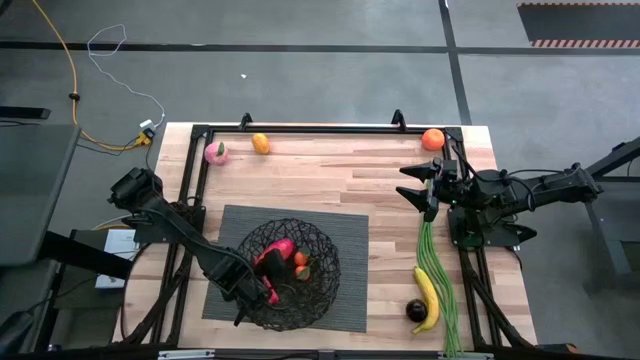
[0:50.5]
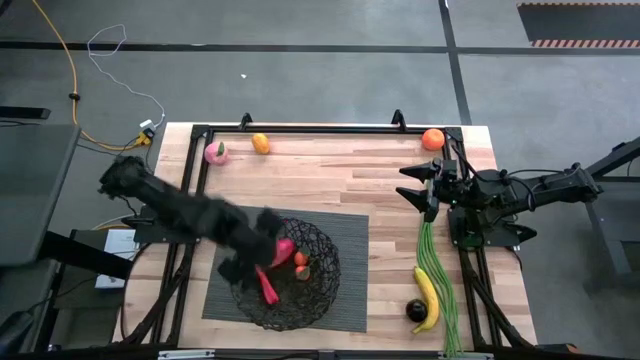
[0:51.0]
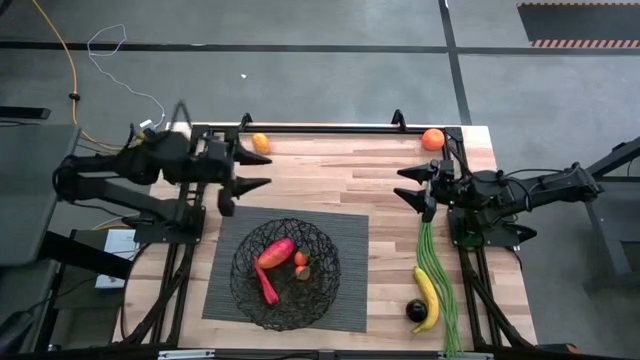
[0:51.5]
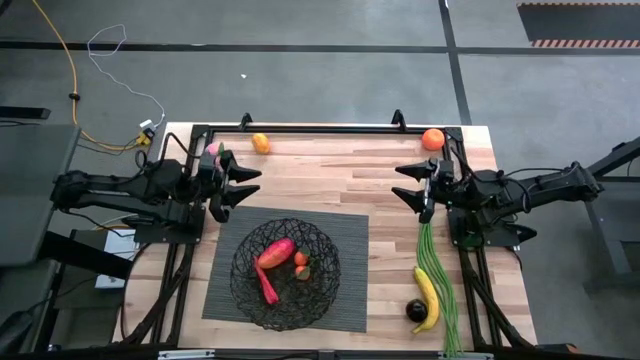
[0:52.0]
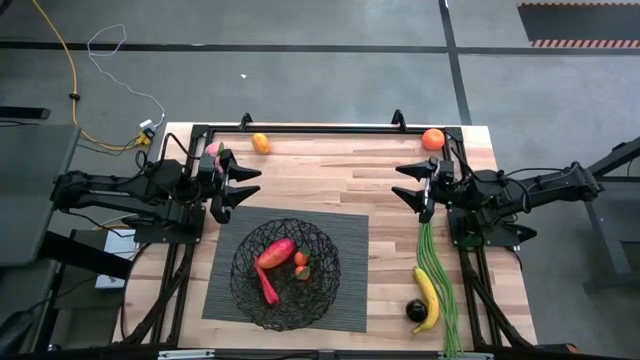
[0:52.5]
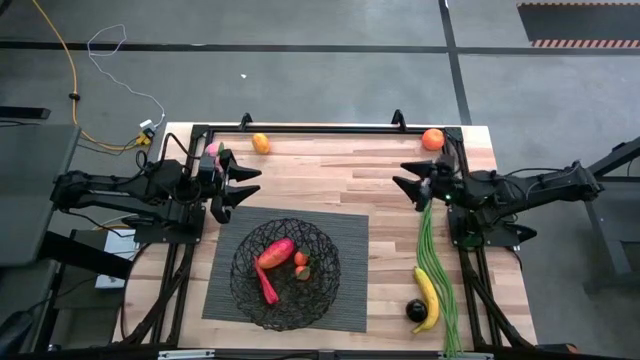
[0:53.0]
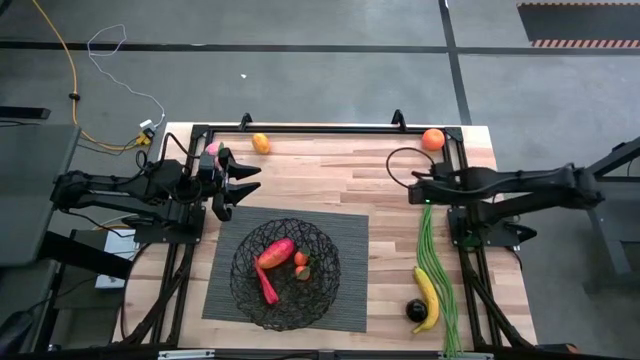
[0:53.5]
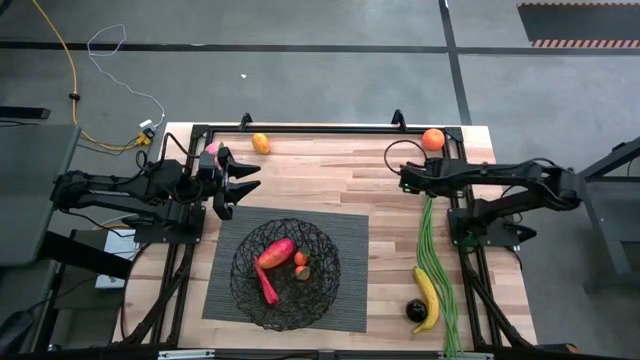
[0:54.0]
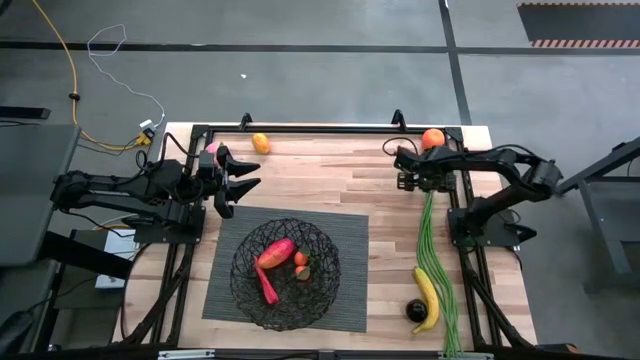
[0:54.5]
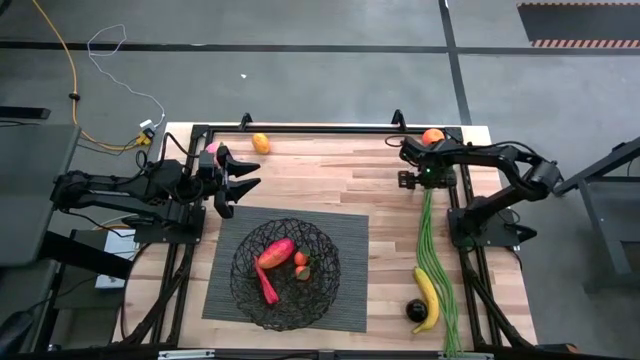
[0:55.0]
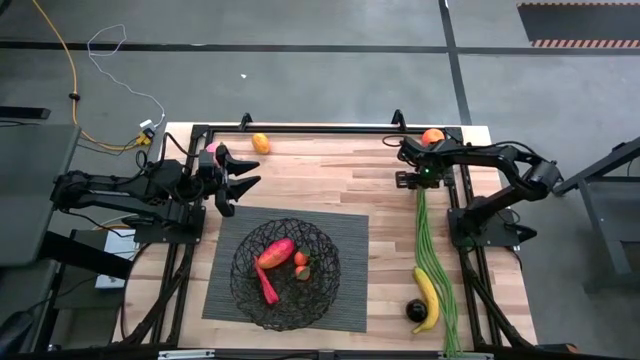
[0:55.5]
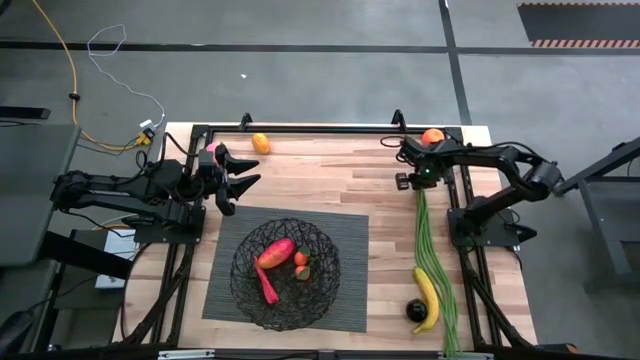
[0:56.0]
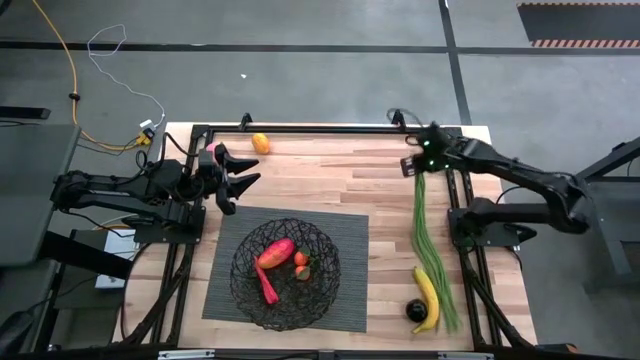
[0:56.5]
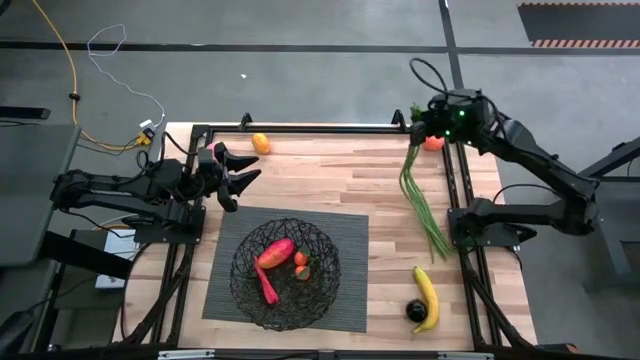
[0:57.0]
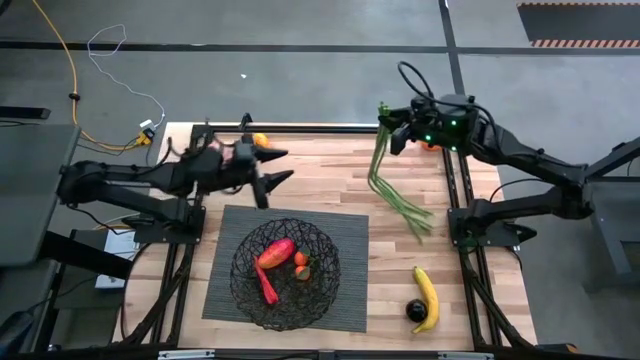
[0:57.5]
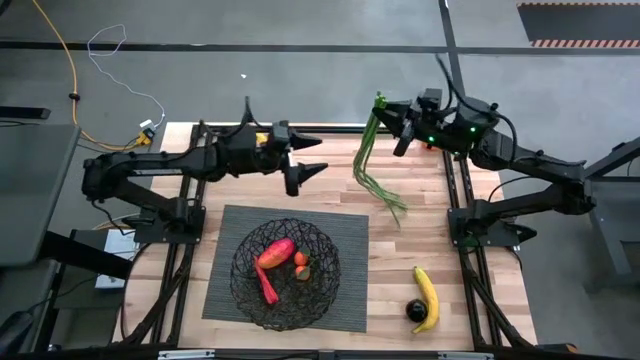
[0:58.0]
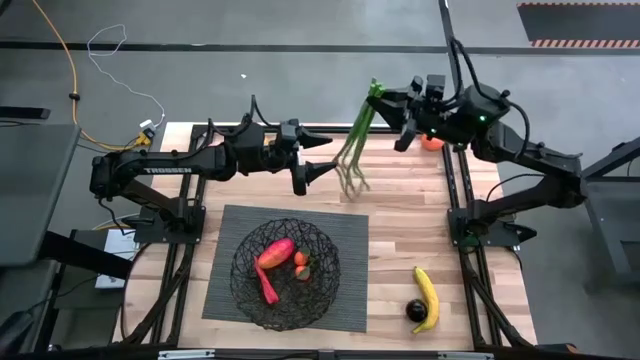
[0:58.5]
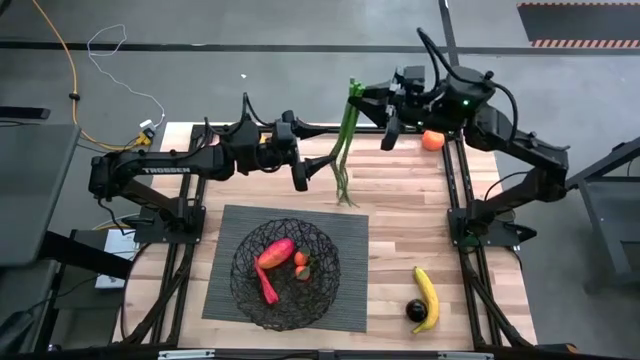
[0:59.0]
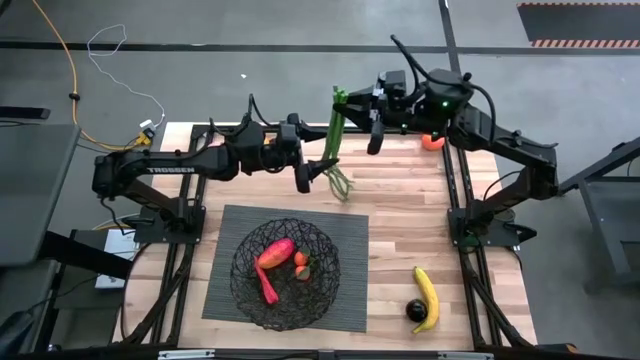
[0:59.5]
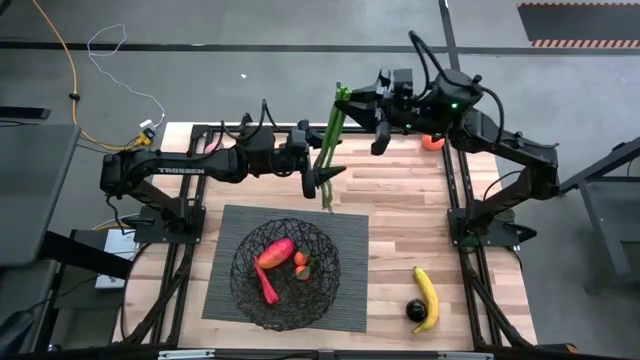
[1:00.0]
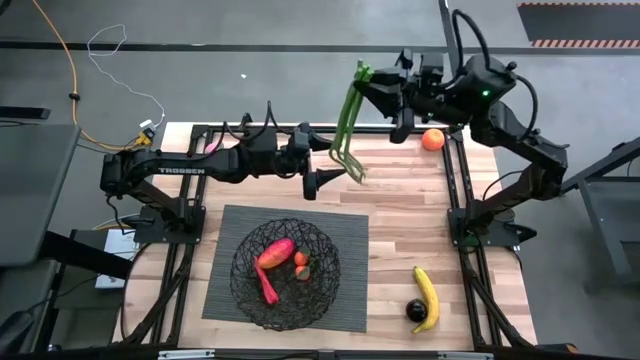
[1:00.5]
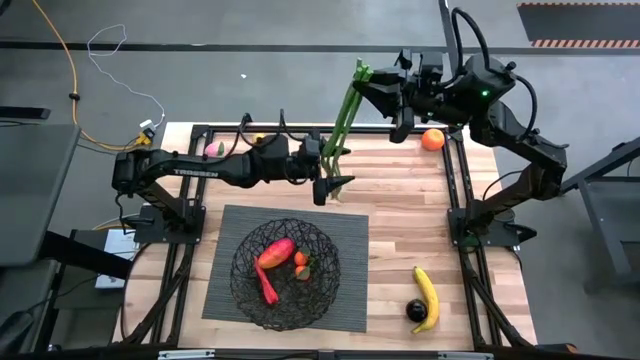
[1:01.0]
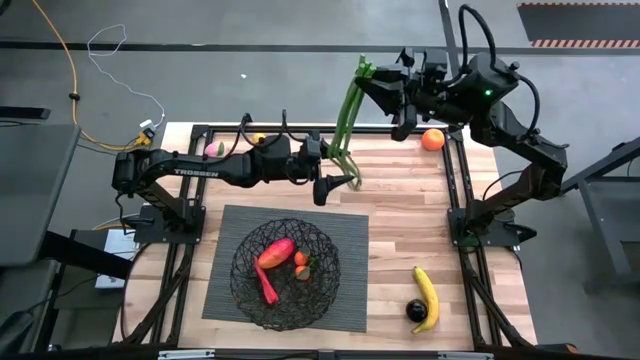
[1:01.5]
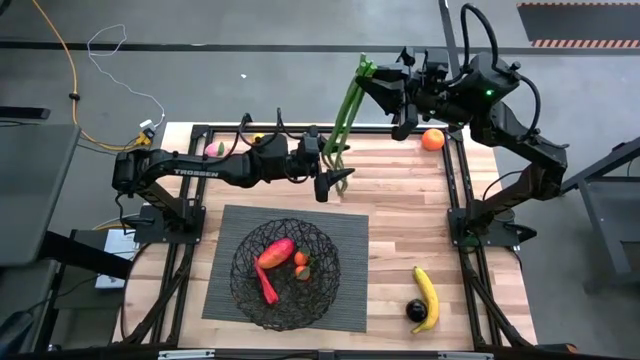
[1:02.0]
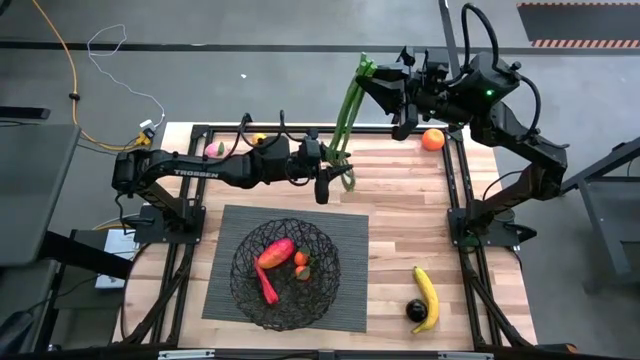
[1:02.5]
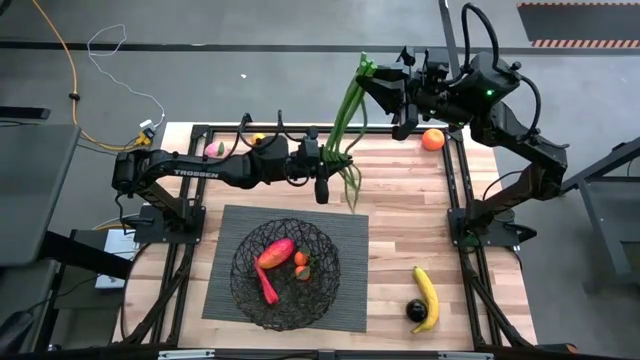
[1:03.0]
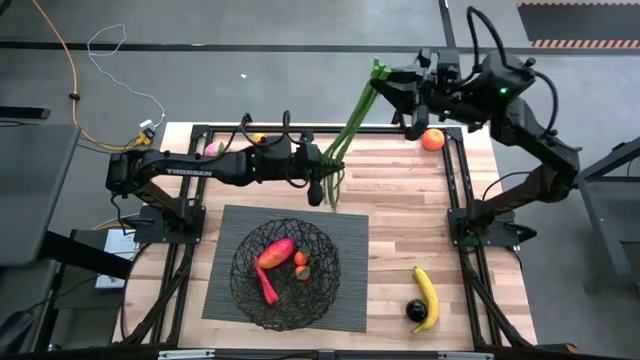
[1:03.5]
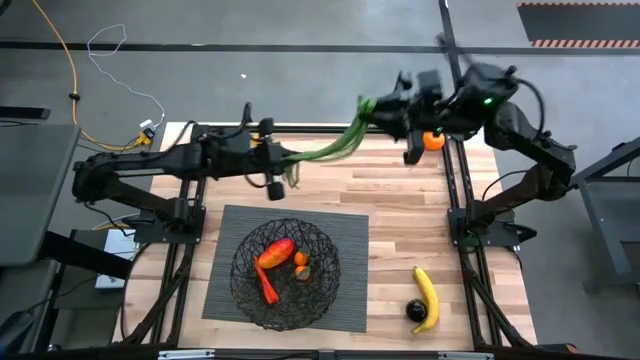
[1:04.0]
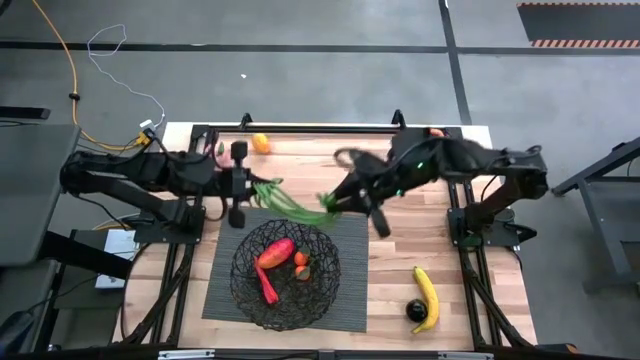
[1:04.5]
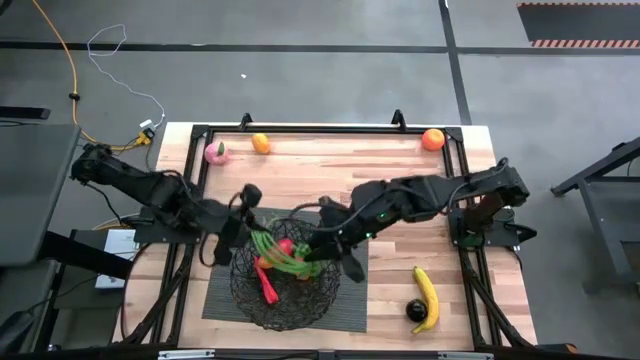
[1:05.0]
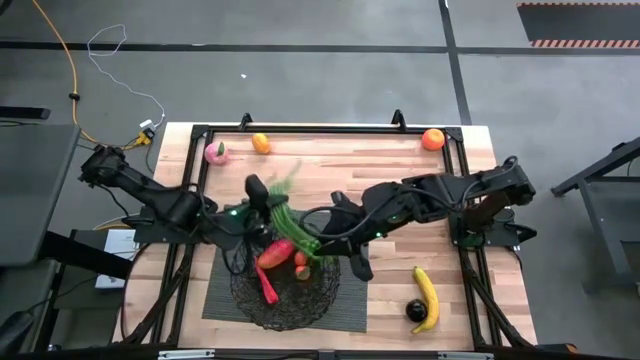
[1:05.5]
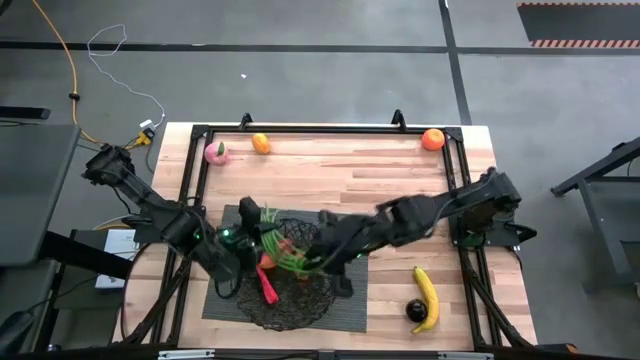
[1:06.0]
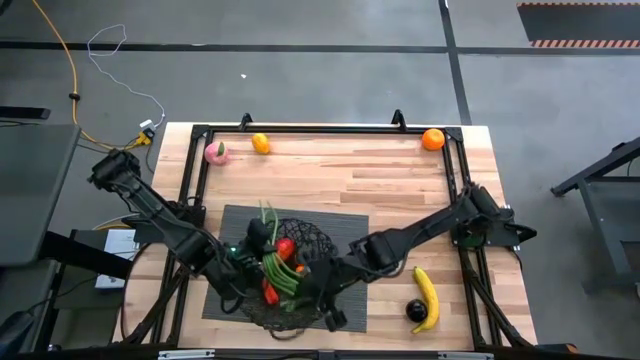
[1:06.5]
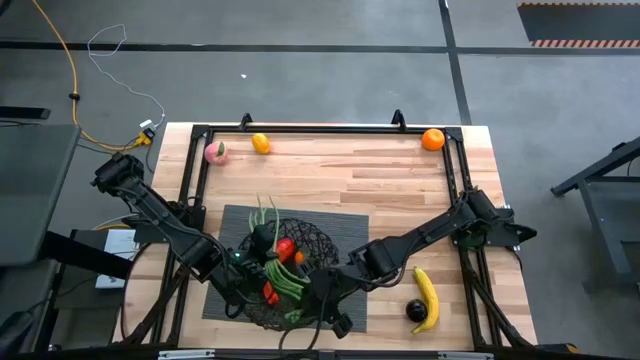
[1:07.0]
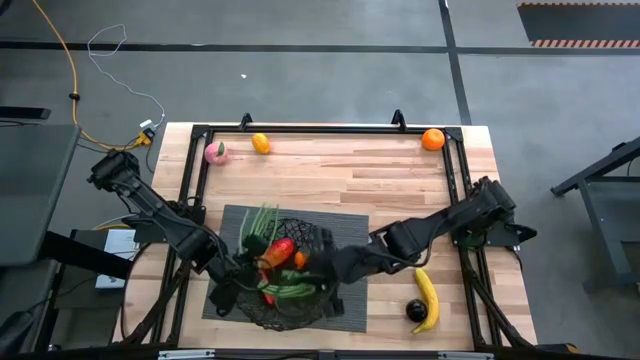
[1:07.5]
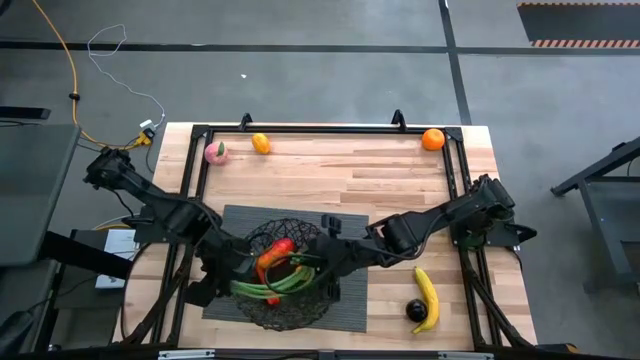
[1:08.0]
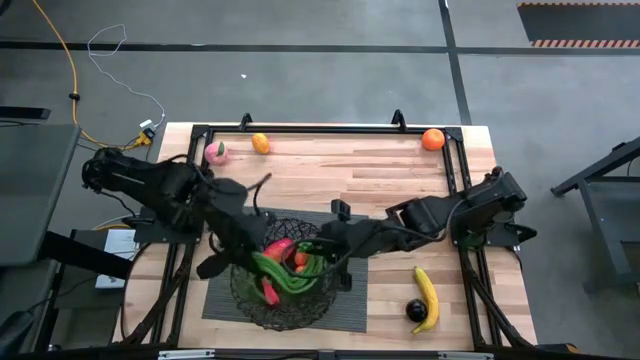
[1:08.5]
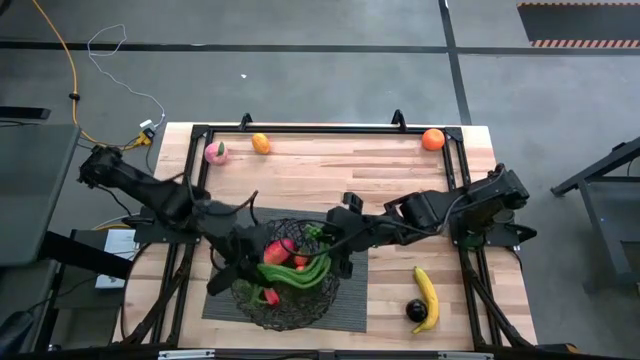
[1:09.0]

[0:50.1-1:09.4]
Task: Build produce basket
Put the green string beans into the black wire basket

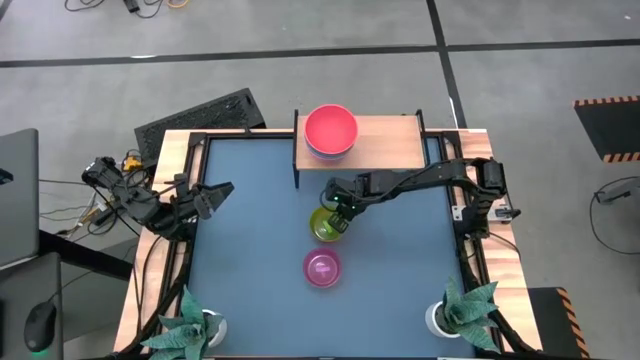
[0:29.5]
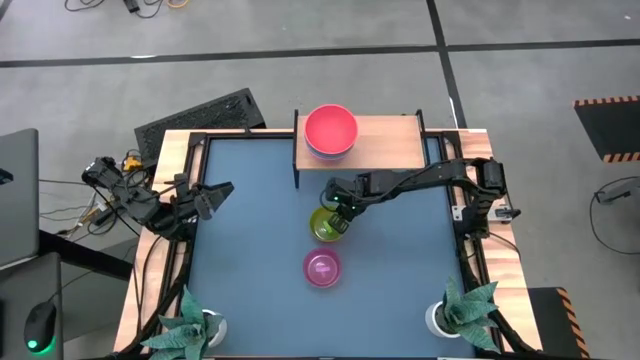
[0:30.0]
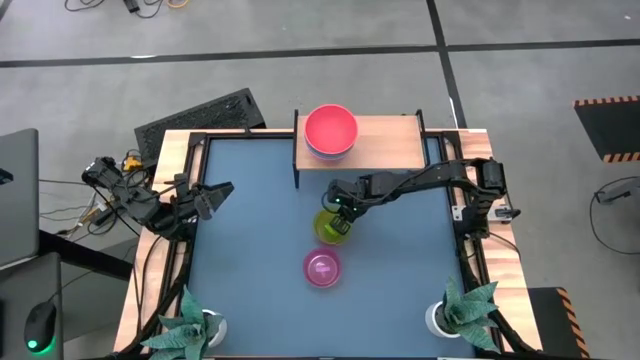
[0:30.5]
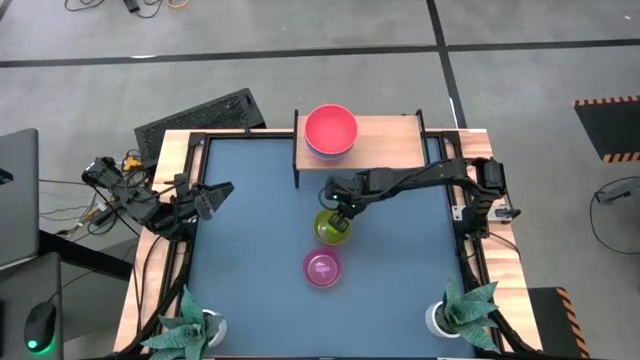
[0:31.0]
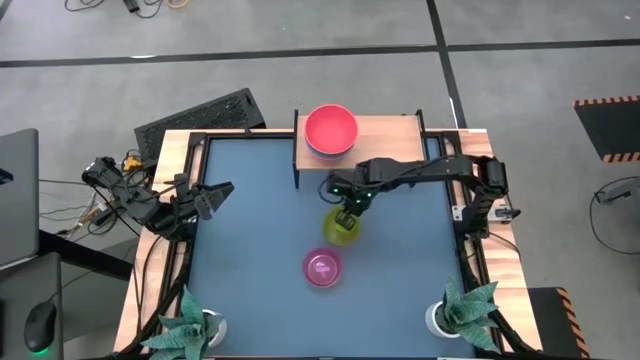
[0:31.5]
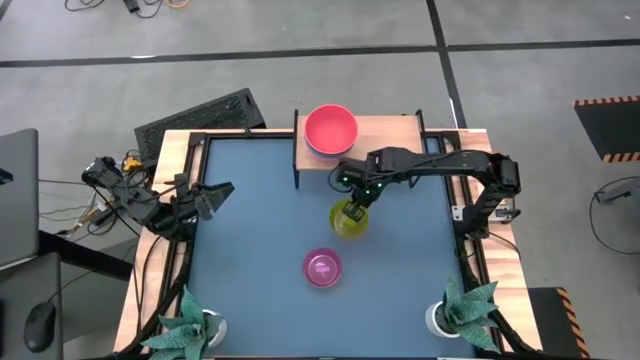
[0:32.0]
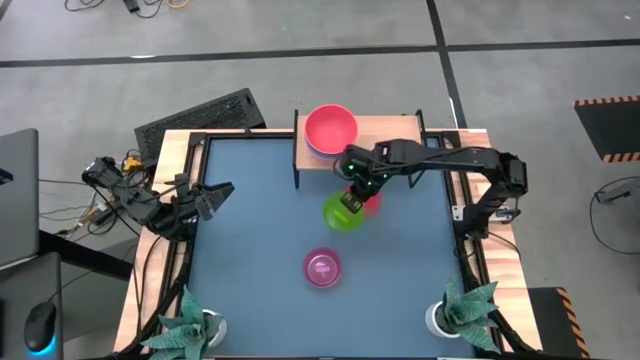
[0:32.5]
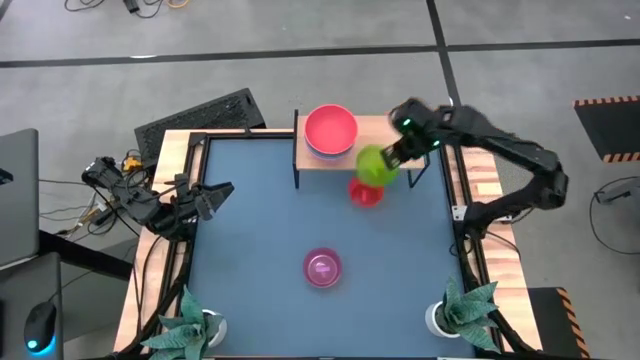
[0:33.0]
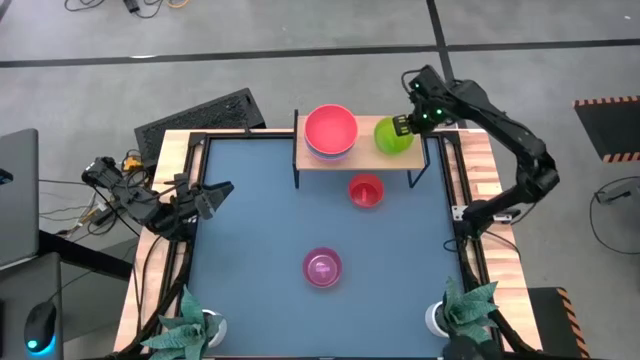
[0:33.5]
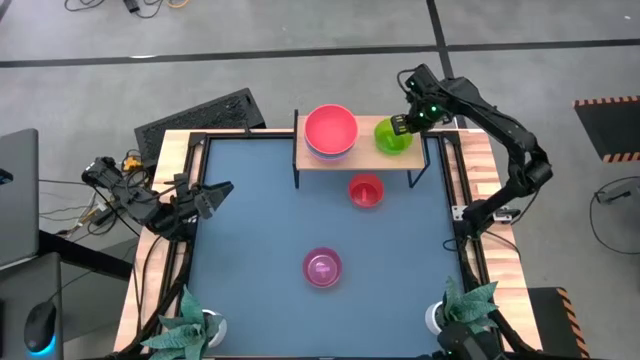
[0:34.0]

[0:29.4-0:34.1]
Task: Place and stack bowls onto a shelf
Put the small green bowl on the shelf
